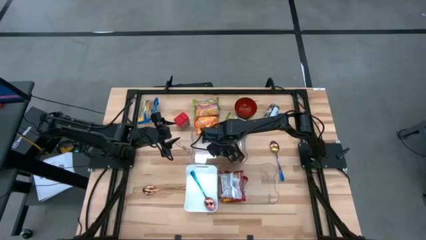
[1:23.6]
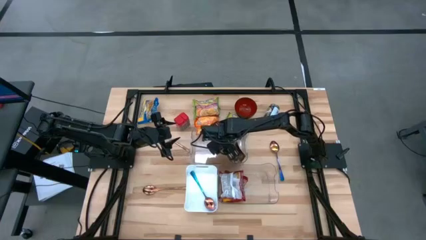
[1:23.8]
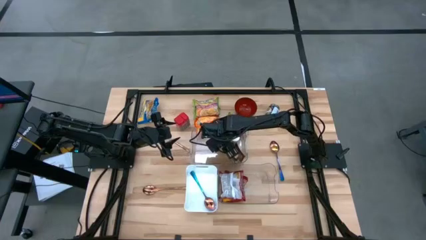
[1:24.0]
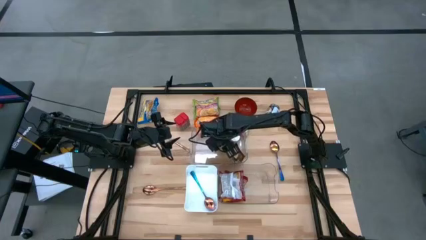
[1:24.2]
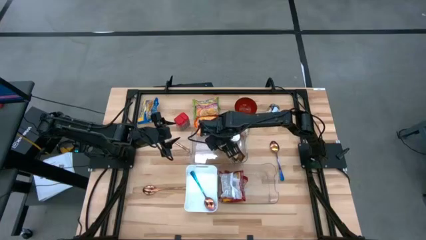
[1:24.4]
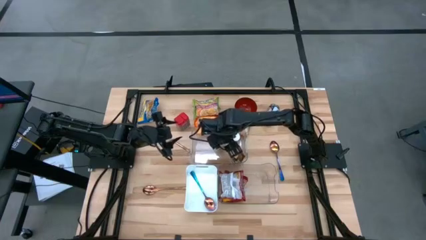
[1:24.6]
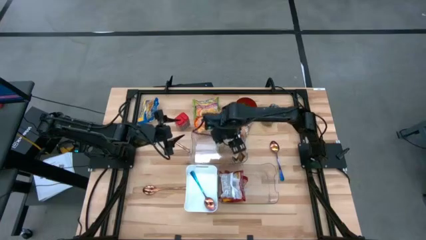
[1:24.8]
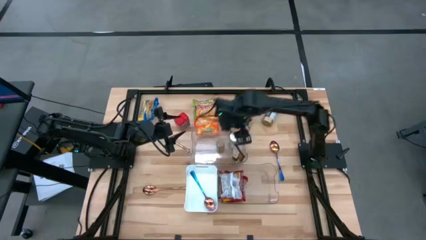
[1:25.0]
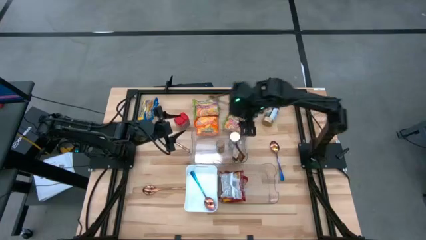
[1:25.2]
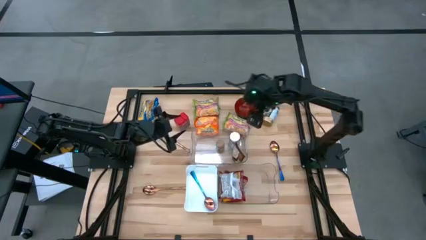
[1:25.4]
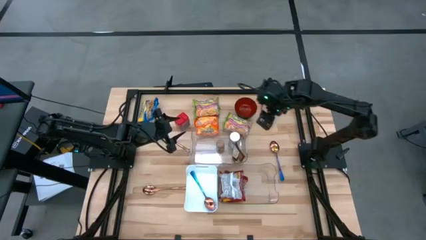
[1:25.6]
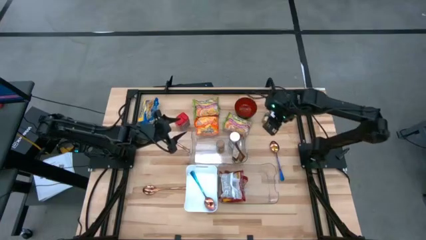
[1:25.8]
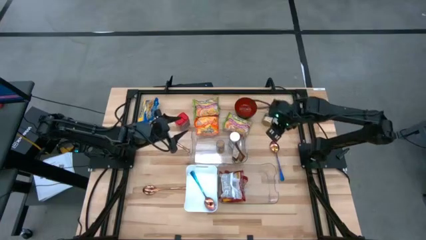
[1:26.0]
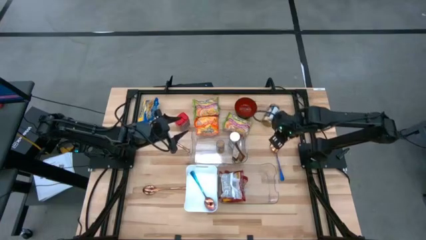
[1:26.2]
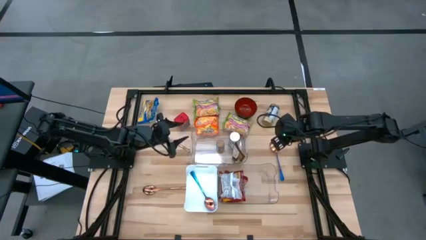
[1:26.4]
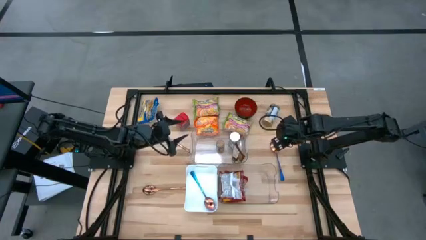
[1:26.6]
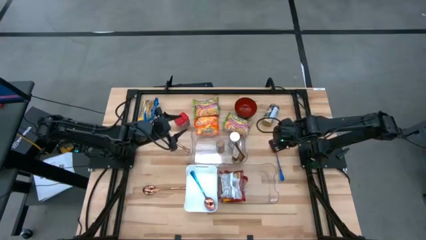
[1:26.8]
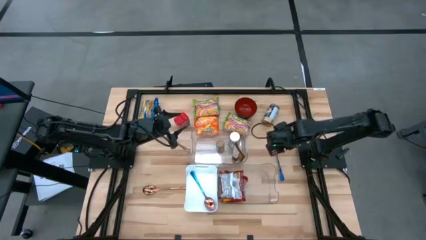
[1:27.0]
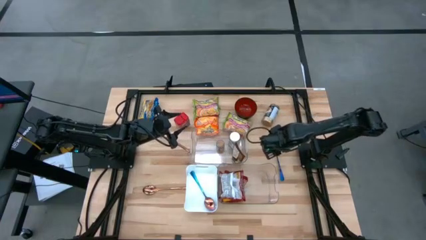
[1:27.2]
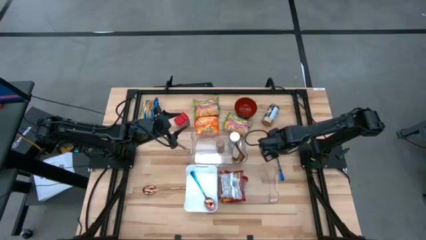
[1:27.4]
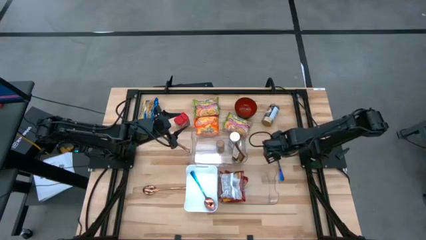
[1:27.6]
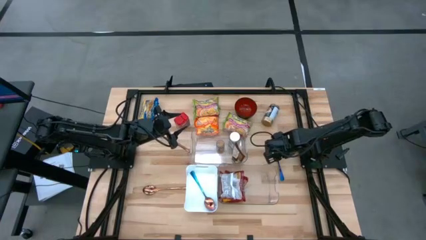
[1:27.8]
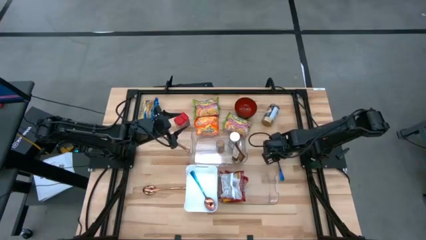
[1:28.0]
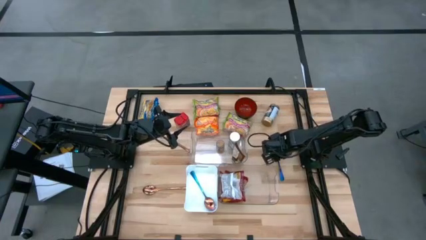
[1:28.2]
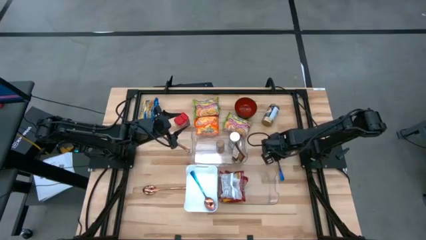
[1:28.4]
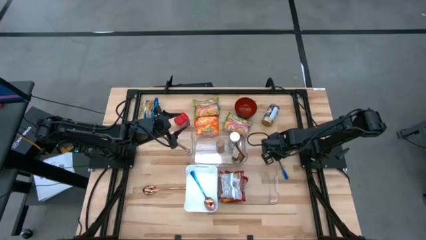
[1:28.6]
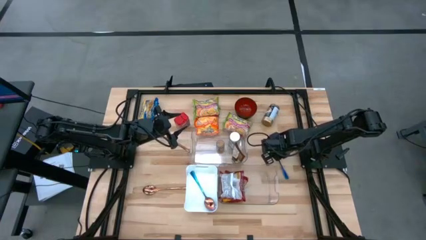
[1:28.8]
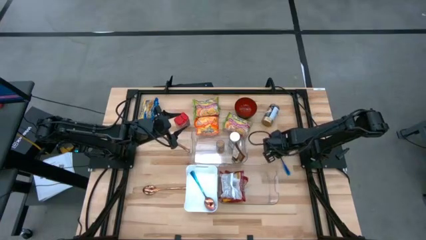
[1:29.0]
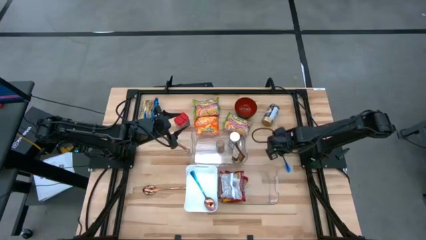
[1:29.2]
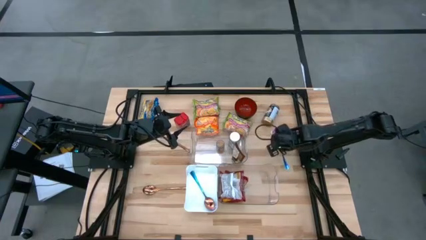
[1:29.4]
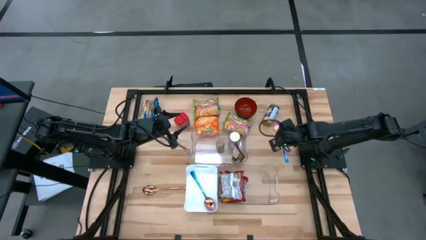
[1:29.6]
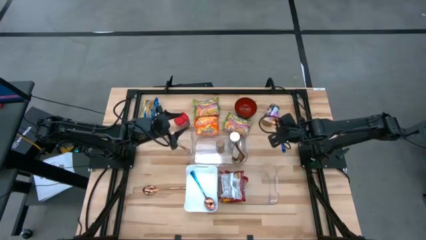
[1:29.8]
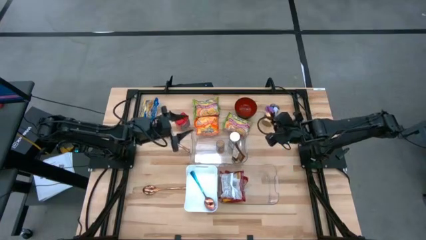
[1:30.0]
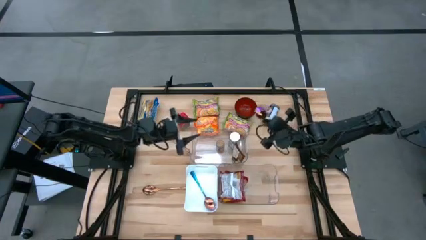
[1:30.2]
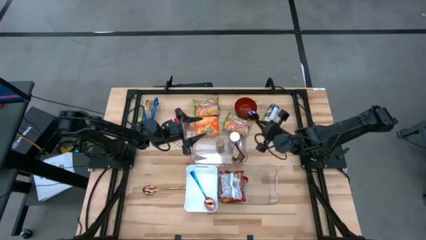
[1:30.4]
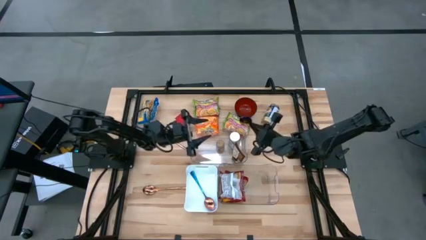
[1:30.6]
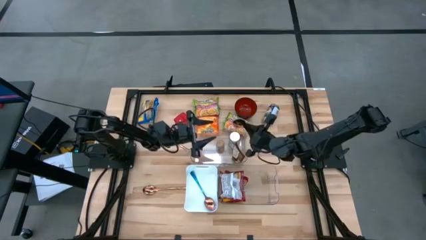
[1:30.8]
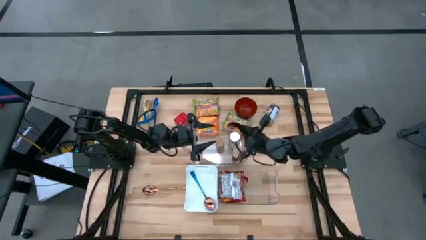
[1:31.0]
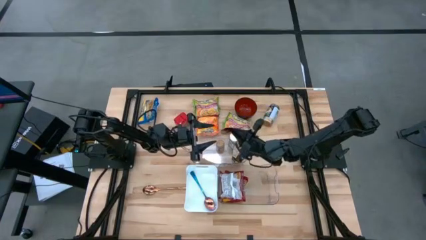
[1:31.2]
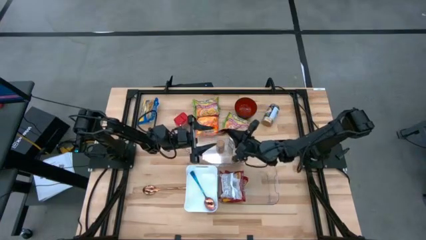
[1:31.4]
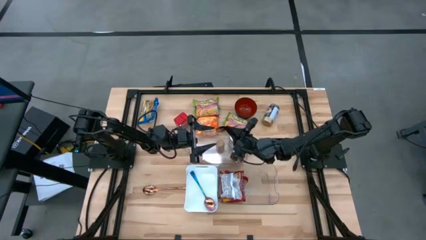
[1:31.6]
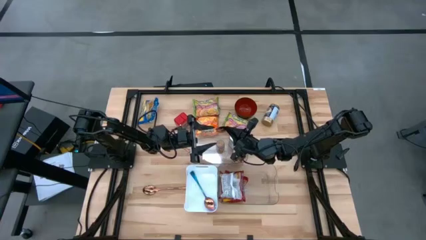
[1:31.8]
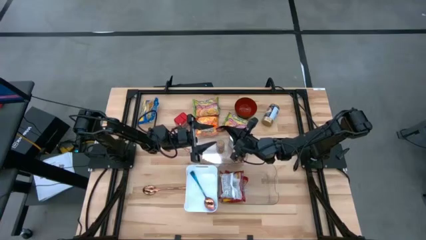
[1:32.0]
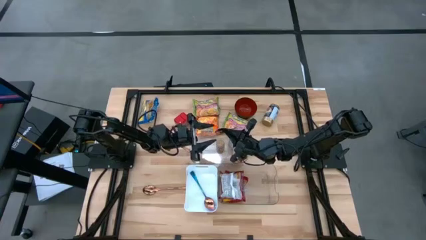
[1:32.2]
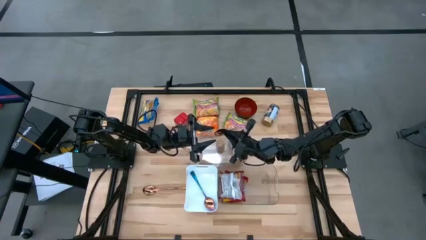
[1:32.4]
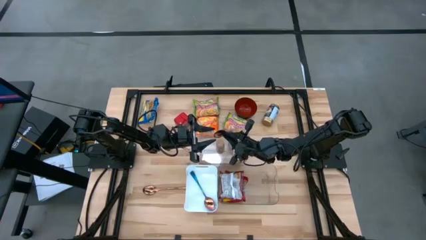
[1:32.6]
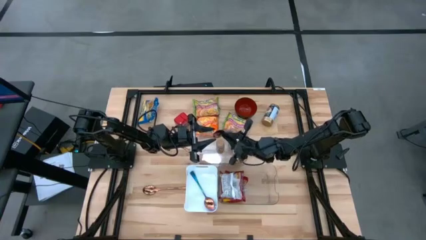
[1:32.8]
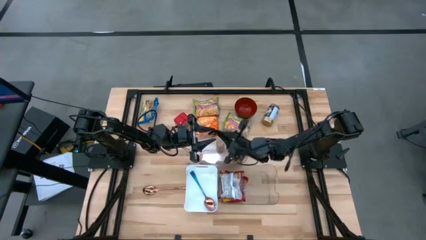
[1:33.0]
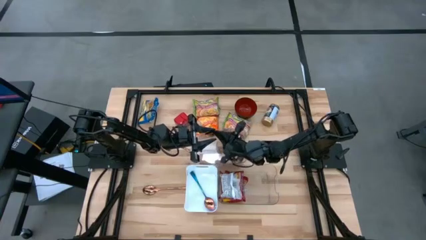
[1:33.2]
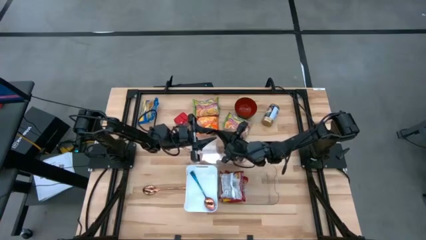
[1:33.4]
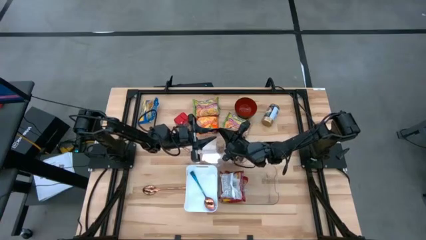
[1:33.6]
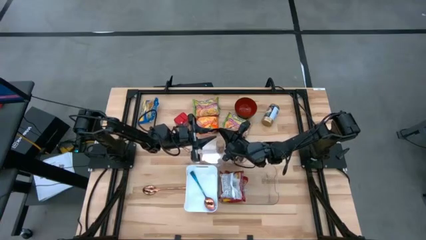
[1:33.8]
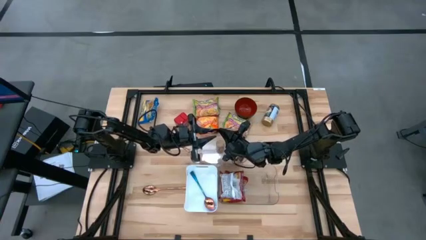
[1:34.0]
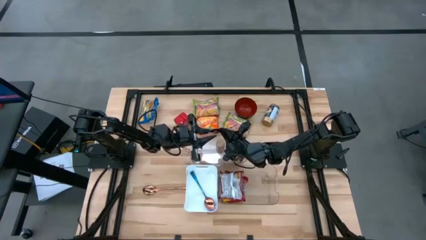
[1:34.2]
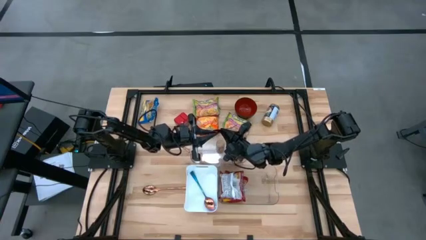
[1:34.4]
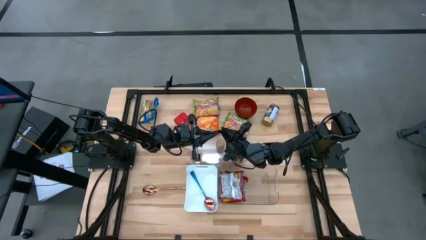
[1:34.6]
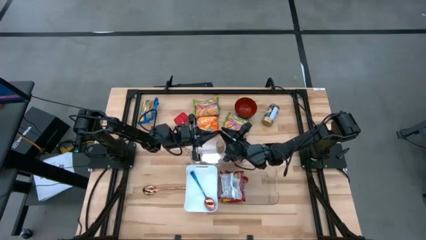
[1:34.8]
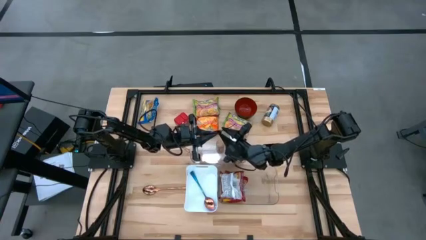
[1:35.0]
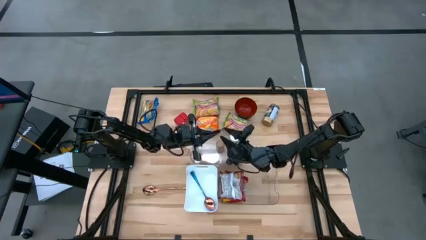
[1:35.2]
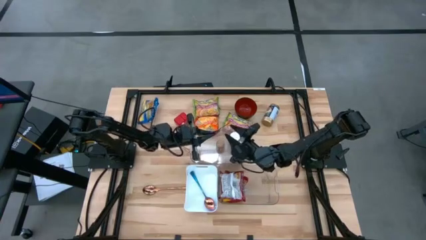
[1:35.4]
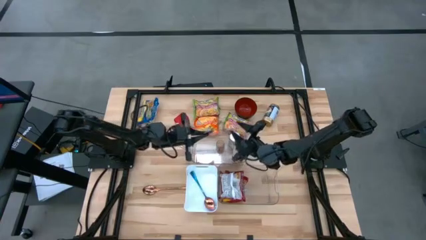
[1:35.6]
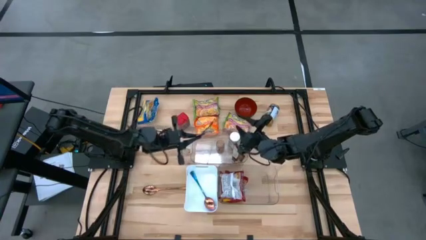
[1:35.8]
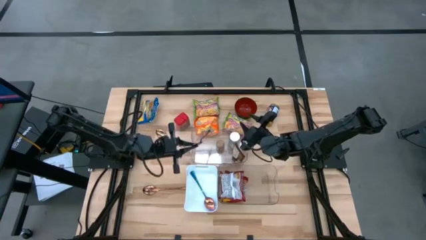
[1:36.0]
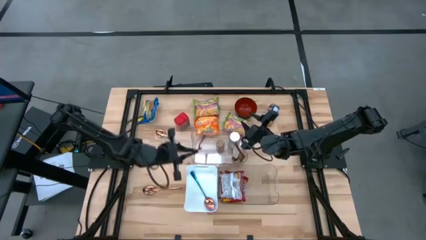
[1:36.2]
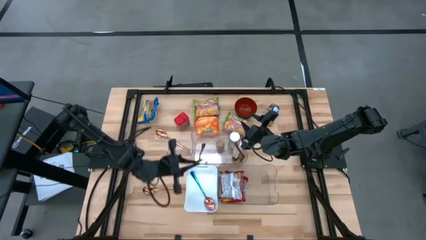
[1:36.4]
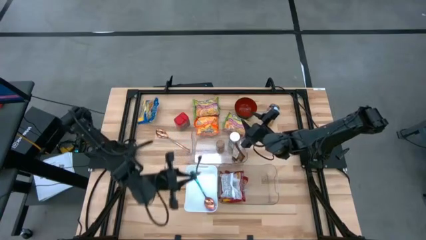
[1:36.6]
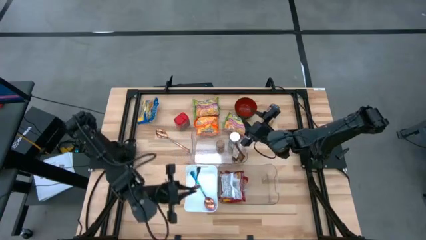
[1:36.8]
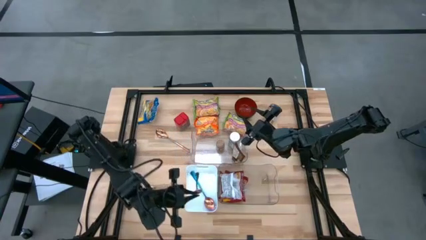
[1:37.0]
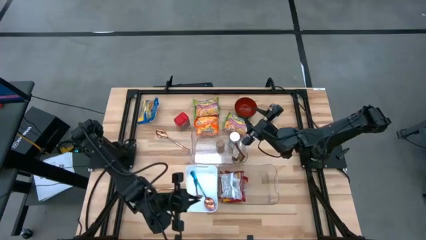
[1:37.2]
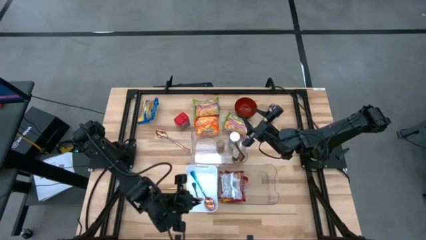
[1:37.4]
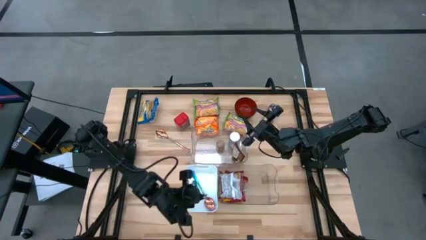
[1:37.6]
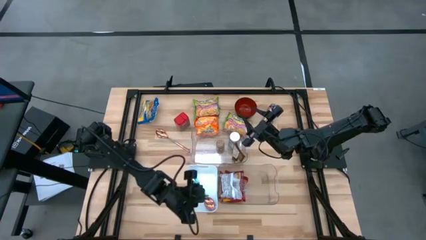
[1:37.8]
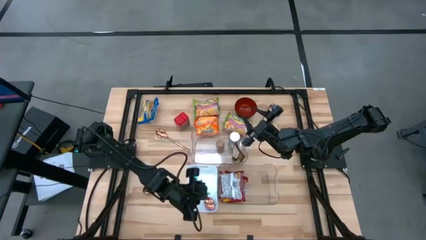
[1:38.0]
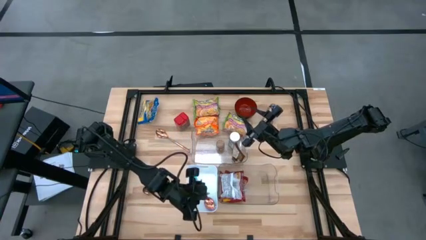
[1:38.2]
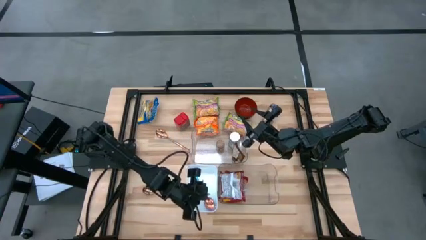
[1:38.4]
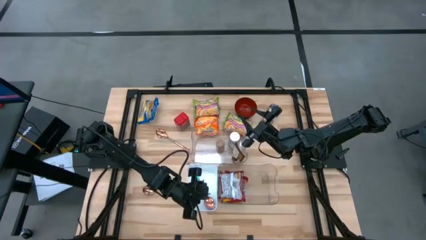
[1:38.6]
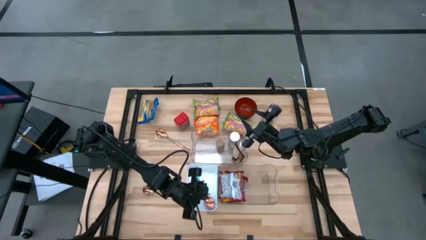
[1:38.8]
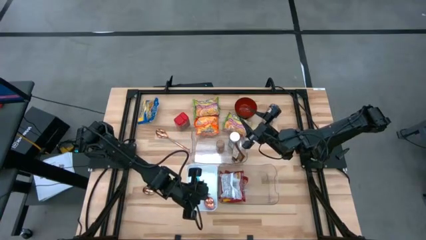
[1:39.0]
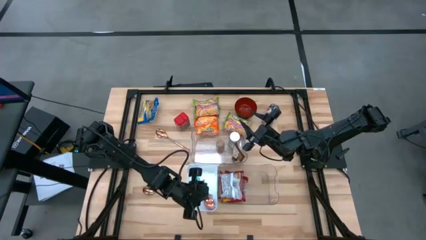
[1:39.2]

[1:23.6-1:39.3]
Task: Pick & Place Food Item
Put the purple spoon into the white bin
